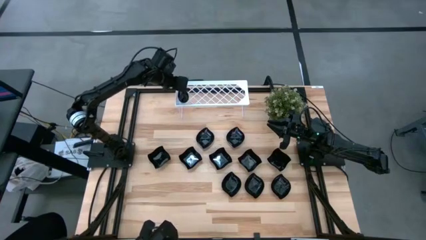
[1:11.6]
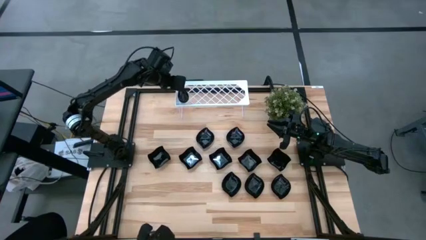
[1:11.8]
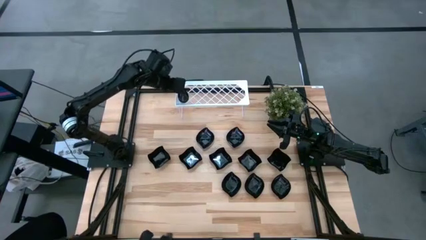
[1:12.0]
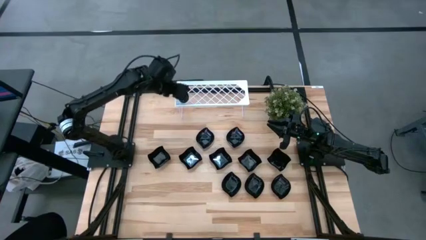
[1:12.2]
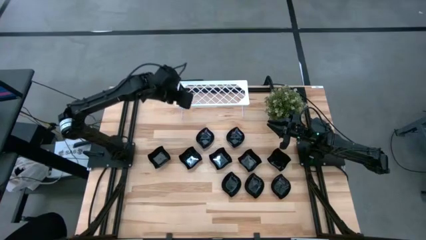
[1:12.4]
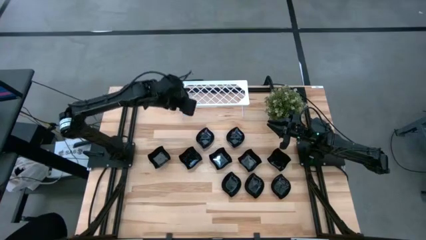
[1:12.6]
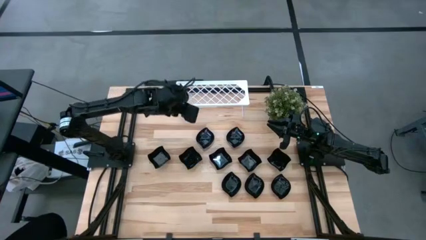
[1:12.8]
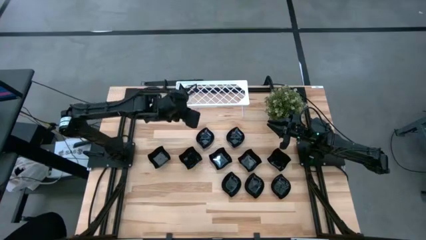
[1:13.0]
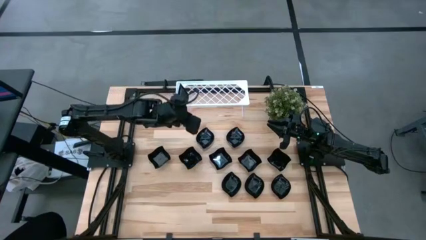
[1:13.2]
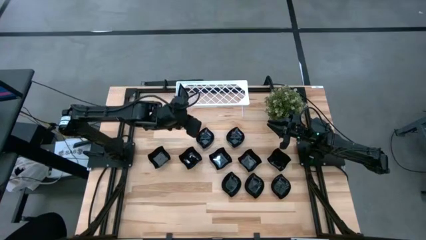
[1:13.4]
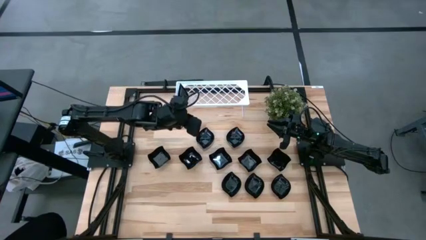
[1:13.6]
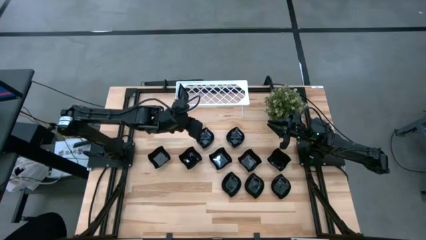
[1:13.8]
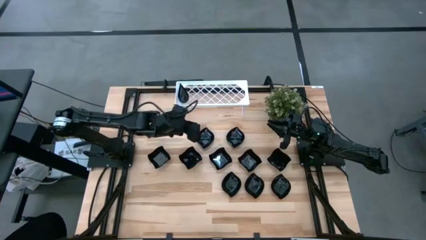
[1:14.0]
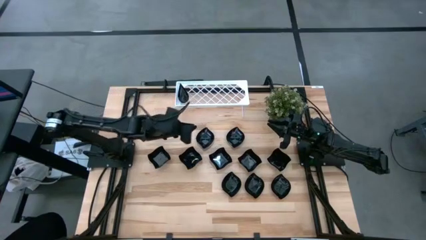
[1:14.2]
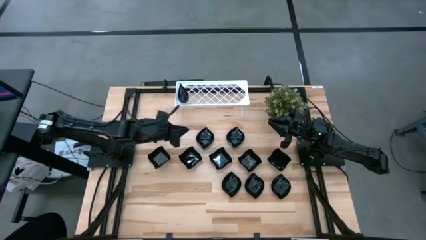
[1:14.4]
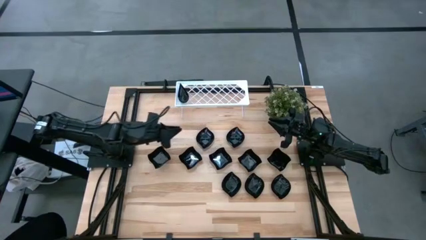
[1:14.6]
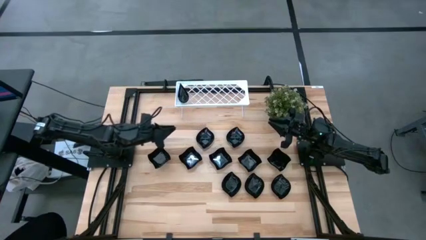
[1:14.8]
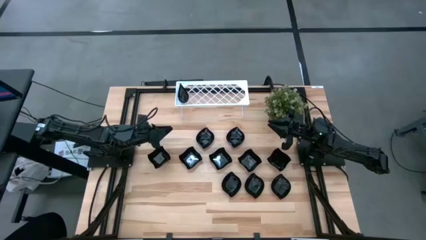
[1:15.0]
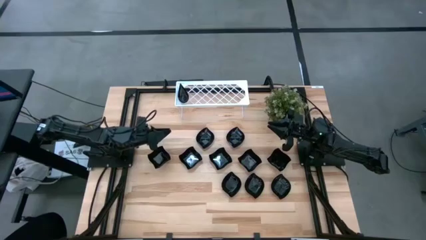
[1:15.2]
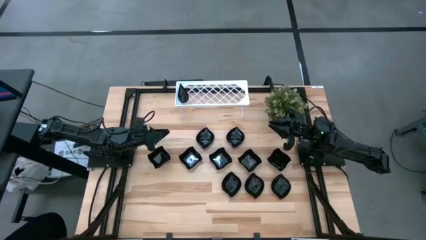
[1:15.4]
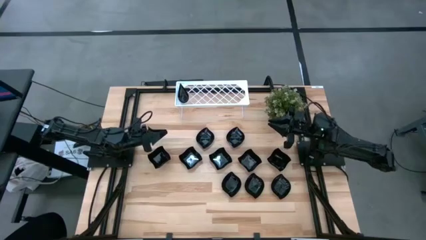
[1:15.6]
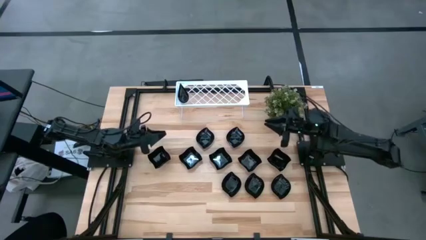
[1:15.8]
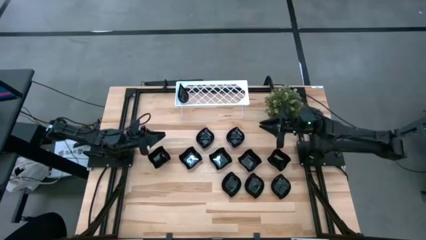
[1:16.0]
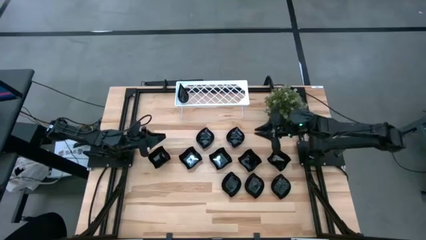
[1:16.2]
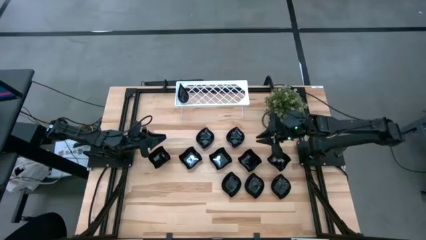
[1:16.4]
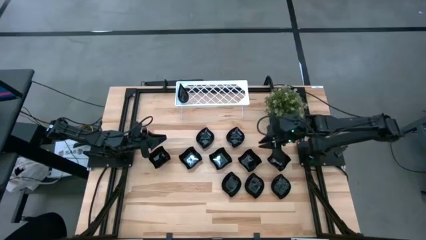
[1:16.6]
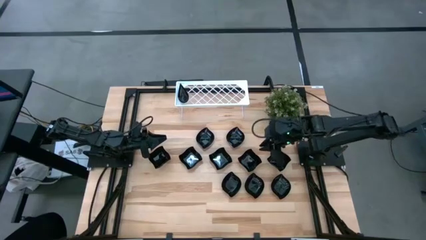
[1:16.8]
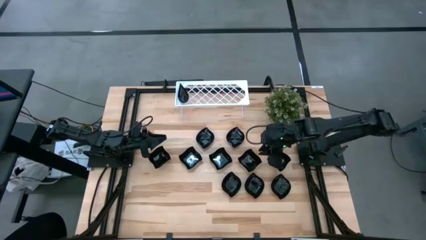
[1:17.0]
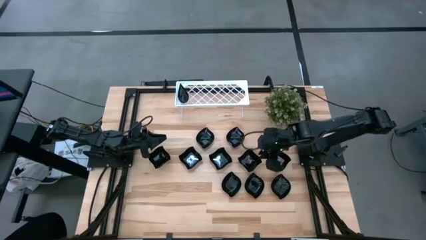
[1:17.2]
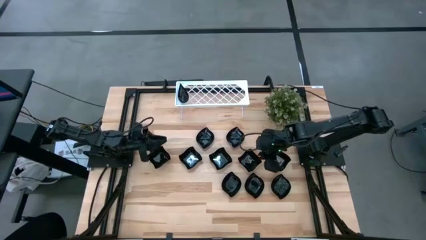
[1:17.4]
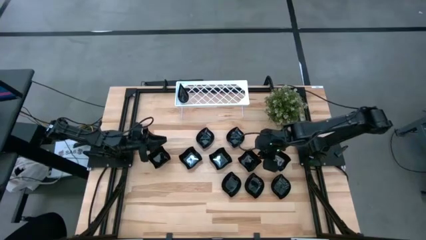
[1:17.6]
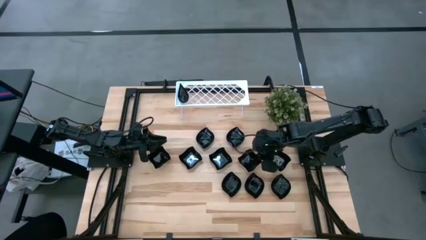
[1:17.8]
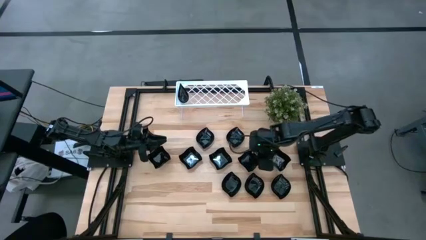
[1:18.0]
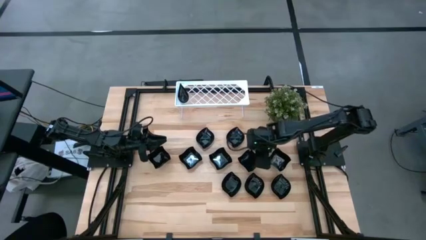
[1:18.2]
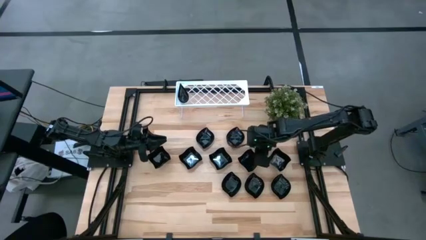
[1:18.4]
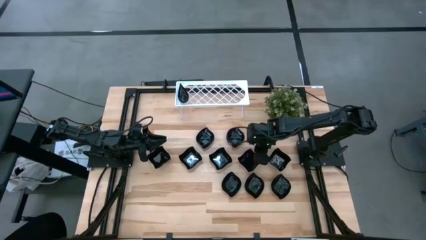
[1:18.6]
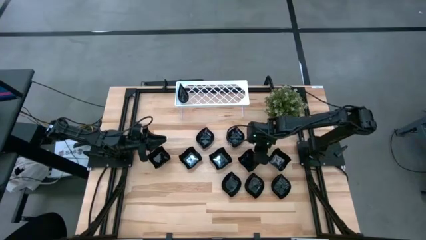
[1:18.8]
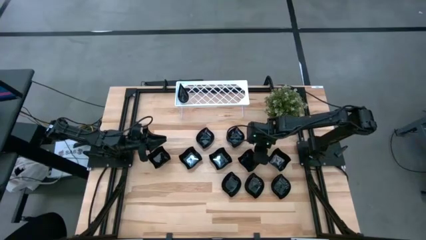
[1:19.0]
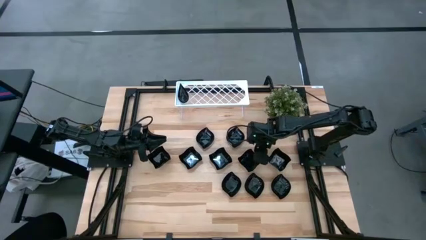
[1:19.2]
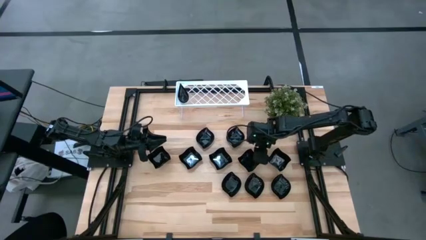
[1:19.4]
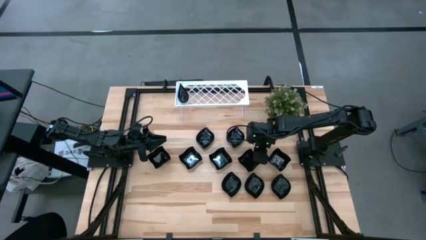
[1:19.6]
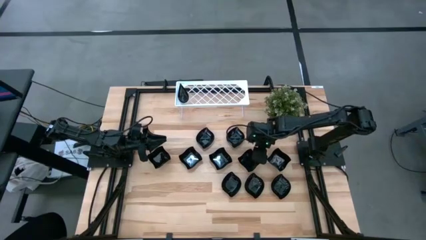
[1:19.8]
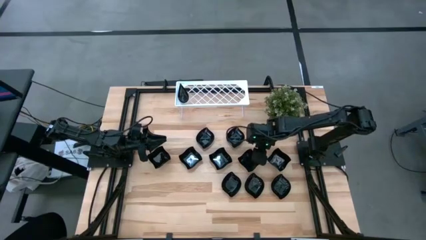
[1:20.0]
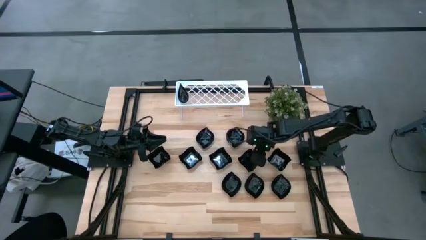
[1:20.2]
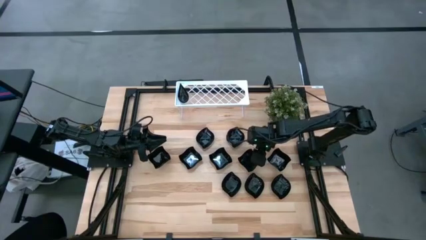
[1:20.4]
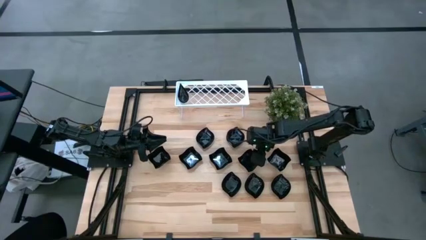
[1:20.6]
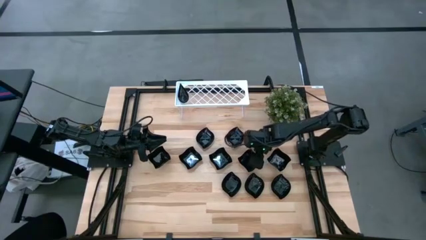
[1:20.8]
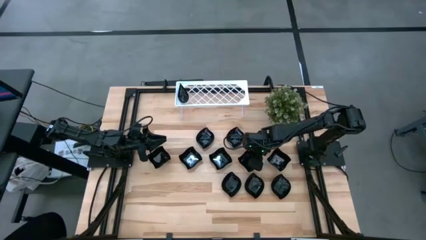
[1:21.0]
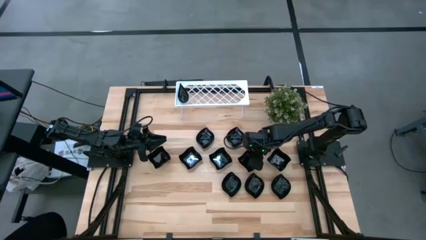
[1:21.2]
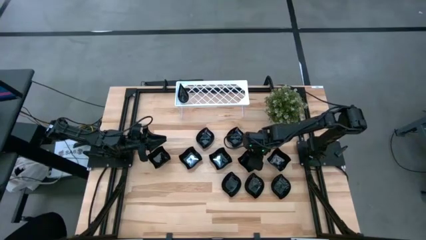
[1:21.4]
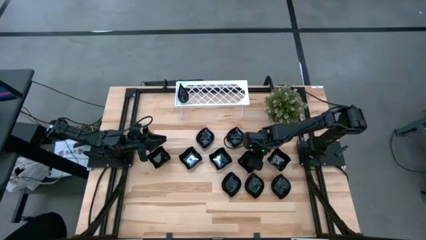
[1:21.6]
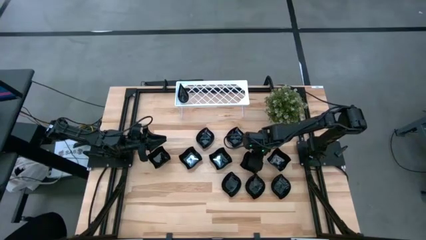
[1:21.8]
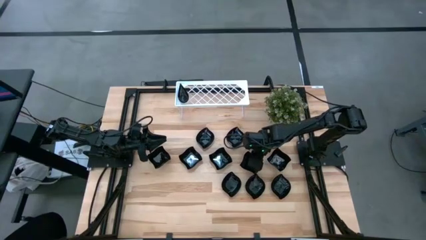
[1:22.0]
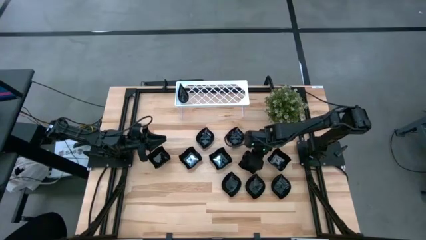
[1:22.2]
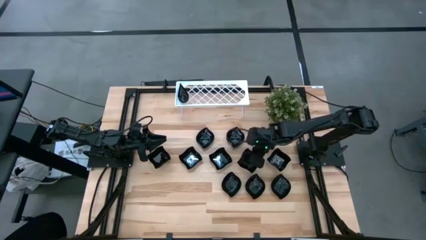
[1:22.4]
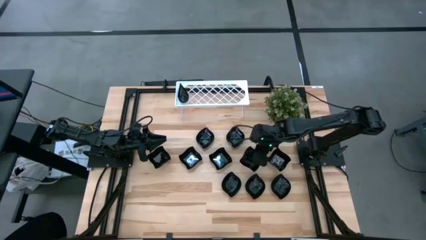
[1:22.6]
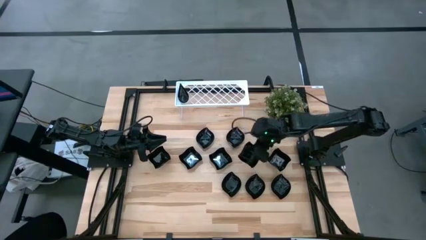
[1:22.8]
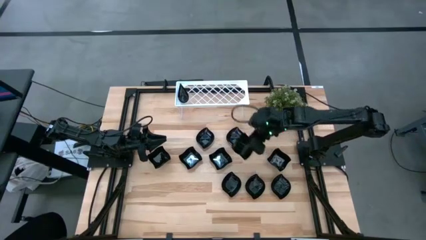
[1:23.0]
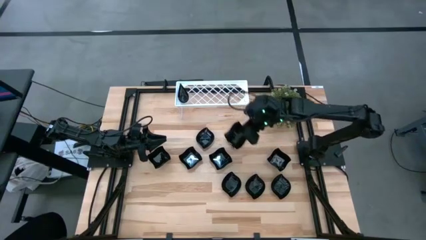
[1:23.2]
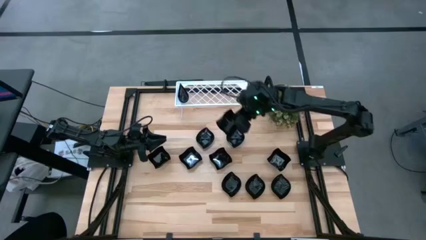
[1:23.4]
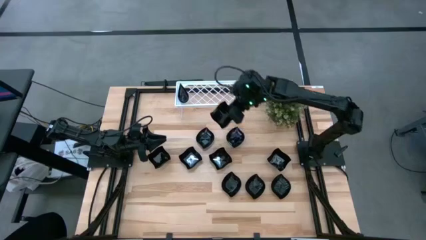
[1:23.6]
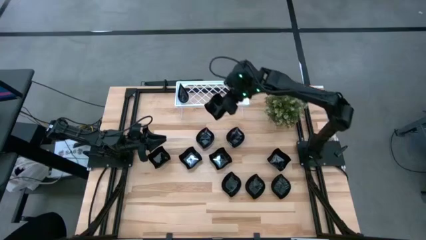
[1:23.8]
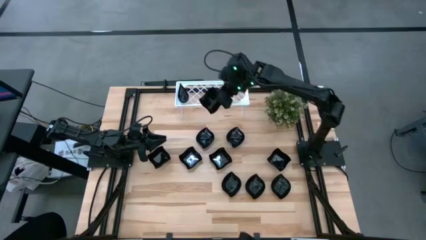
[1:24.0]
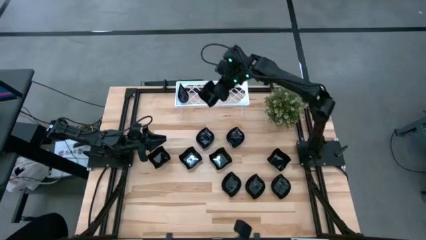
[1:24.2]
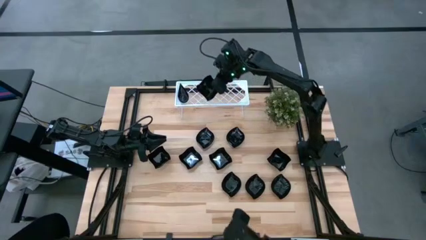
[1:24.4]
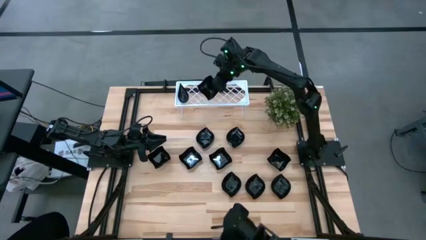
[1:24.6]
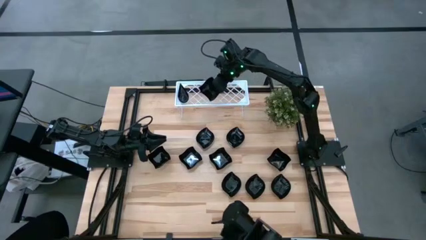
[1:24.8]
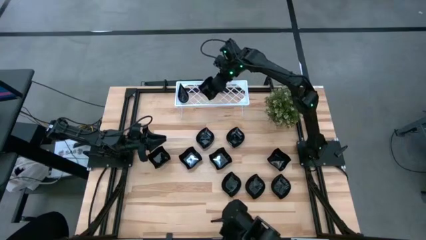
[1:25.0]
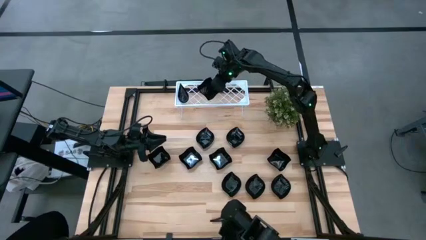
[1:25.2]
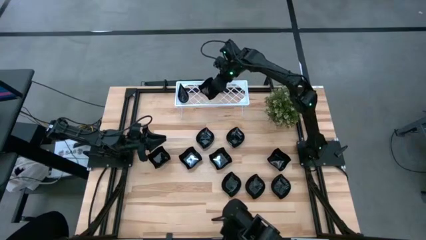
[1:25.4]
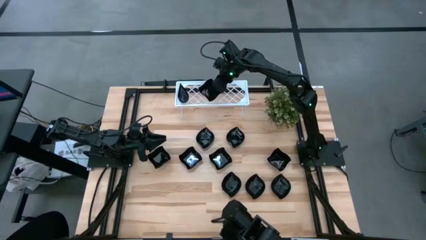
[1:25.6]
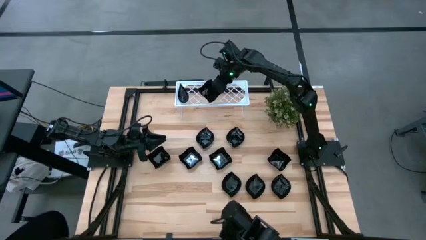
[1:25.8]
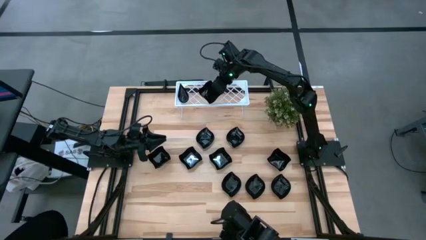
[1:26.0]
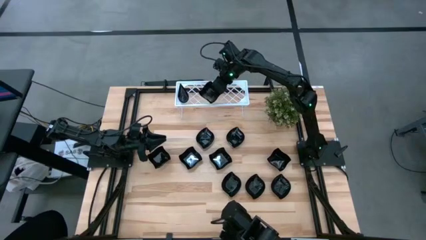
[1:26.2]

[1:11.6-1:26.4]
Task: Pick & Place Mini shaped plates
Put the distorted square-shaped plate on the shelf

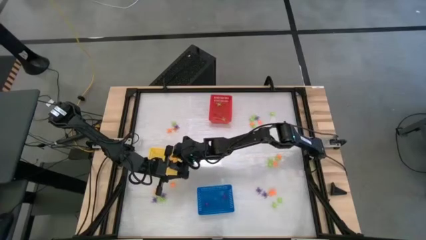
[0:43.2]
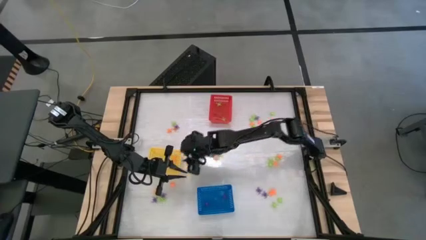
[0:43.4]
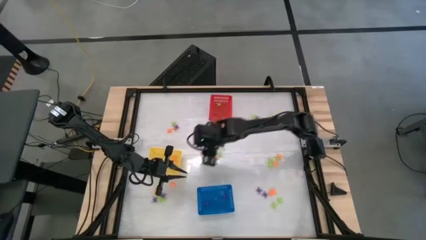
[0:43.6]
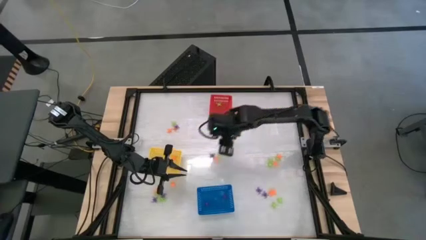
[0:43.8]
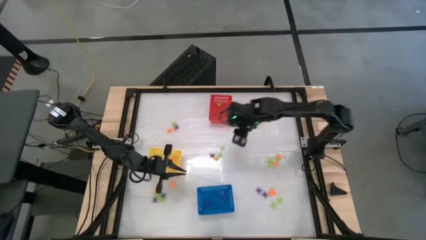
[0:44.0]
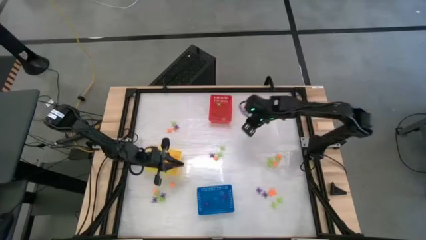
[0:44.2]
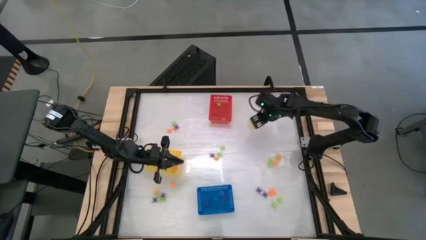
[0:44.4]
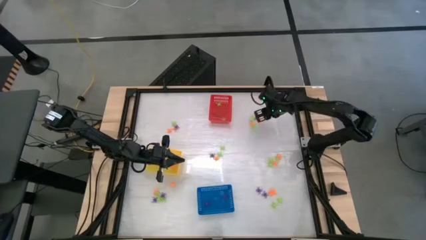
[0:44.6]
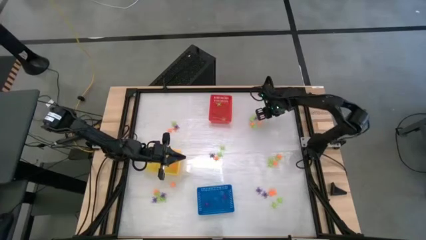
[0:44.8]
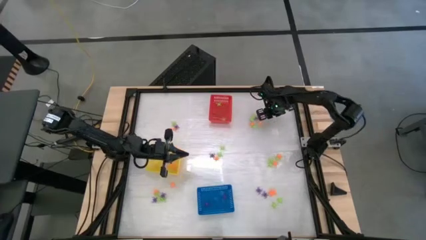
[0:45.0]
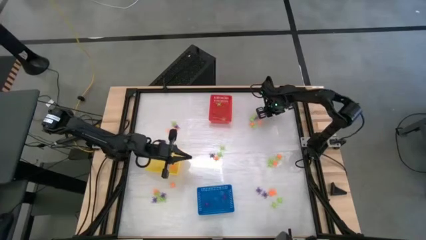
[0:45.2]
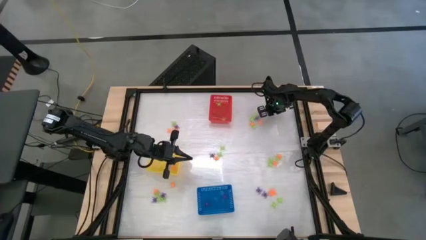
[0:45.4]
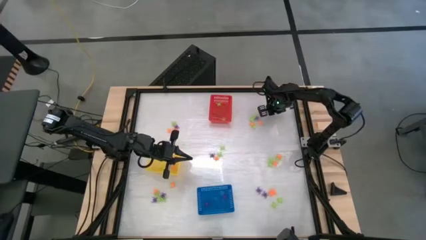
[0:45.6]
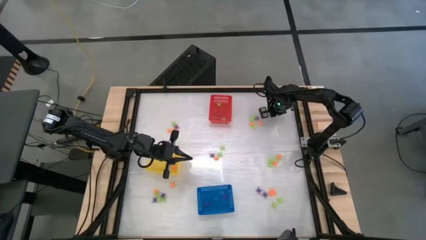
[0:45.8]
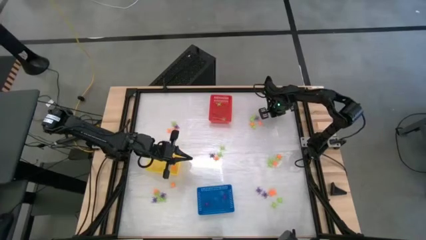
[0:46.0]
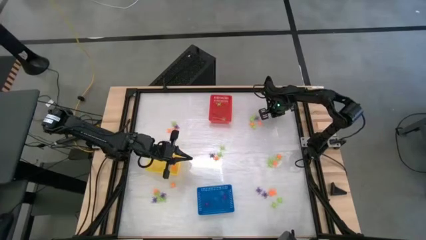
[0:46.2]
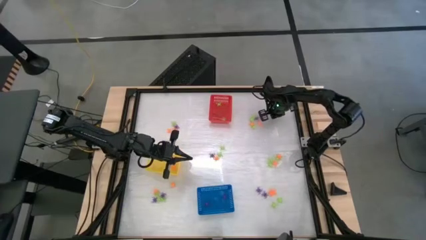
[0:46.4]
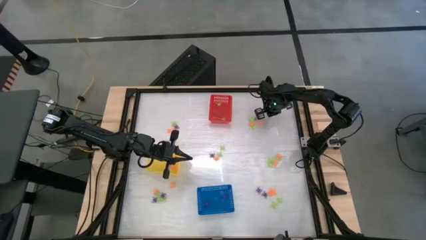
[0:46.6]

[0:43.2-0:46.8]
Task: Sort Halloween decoration
Put the green spider toy into the red basket
